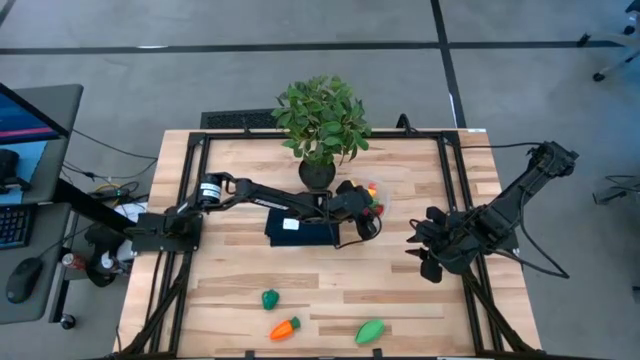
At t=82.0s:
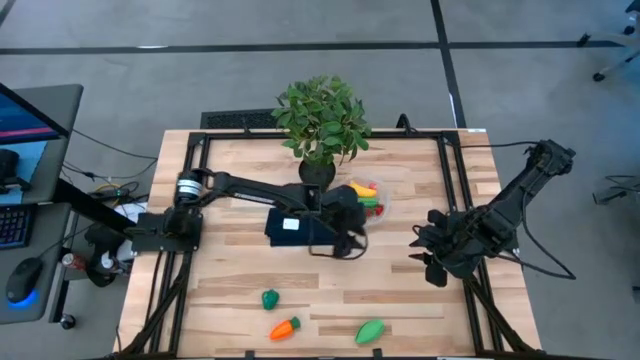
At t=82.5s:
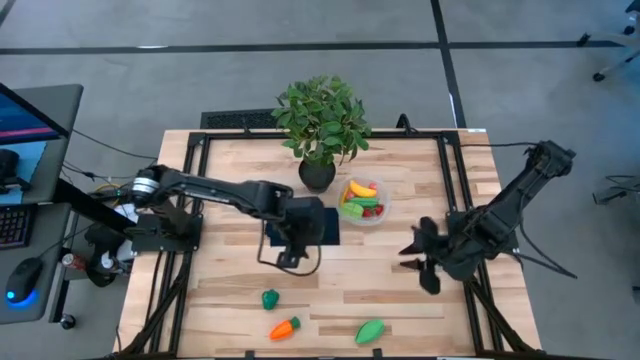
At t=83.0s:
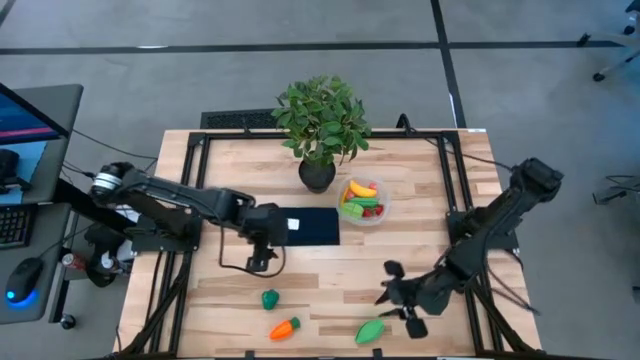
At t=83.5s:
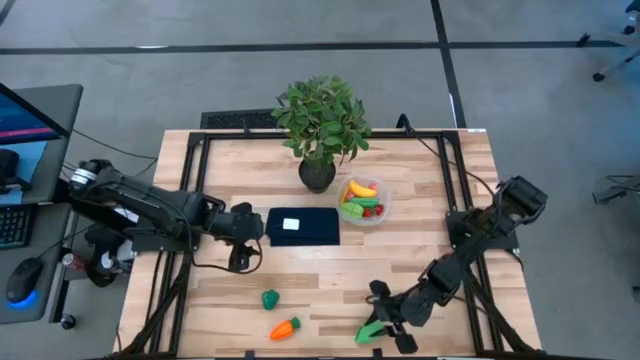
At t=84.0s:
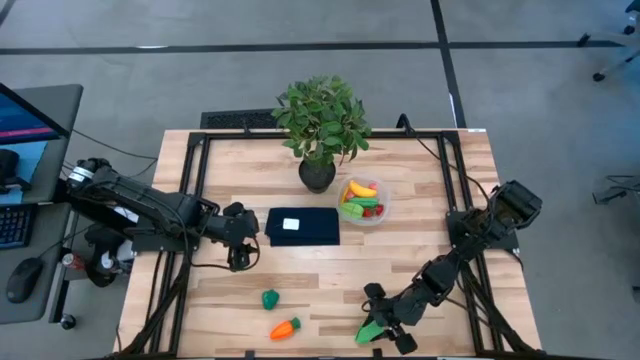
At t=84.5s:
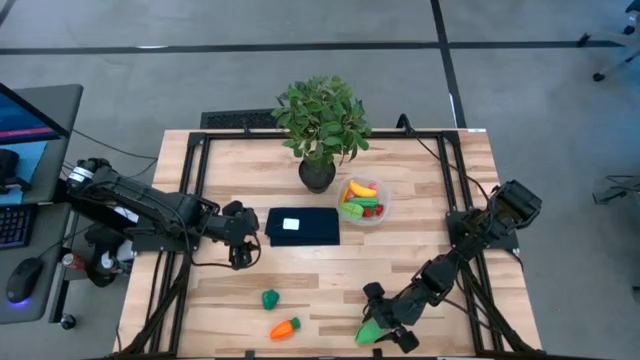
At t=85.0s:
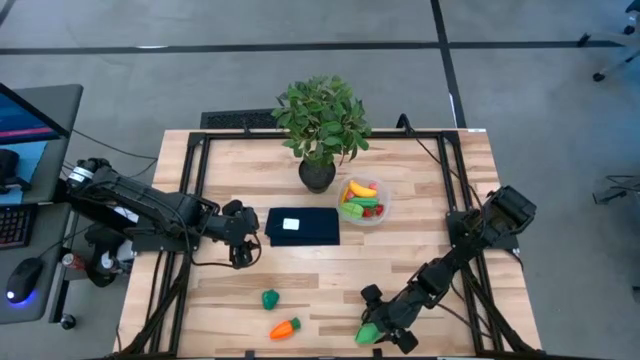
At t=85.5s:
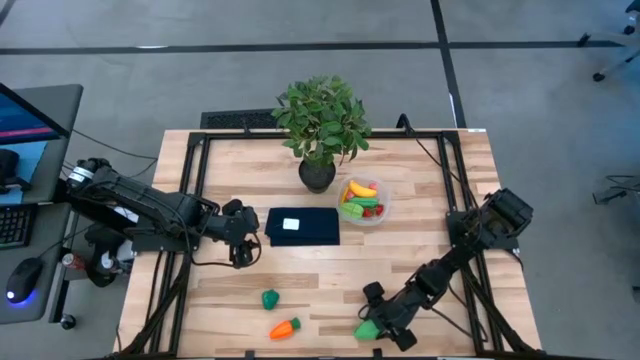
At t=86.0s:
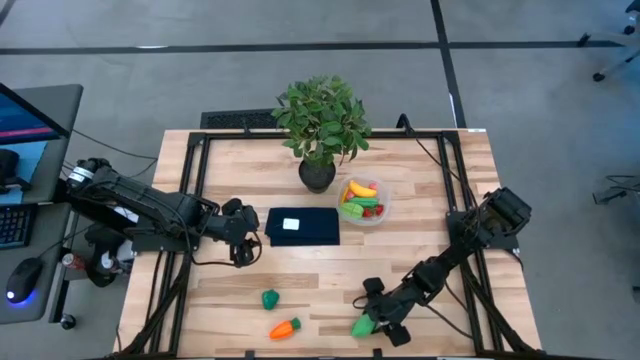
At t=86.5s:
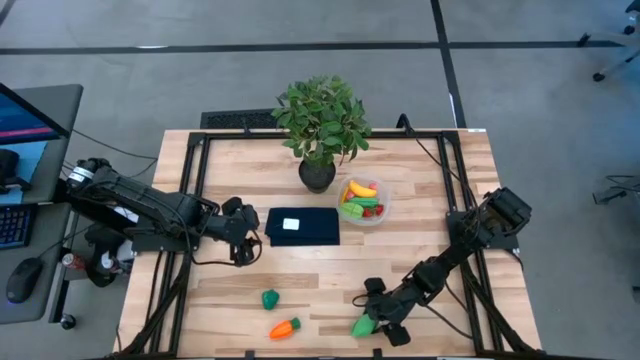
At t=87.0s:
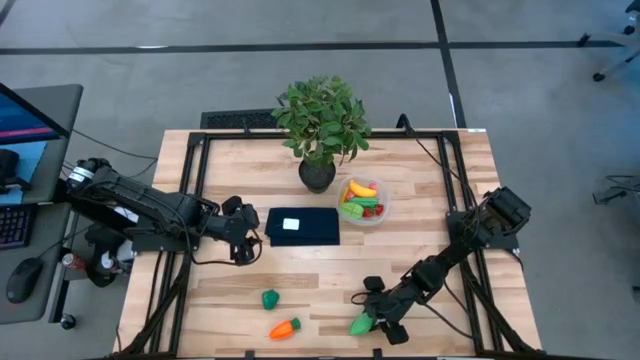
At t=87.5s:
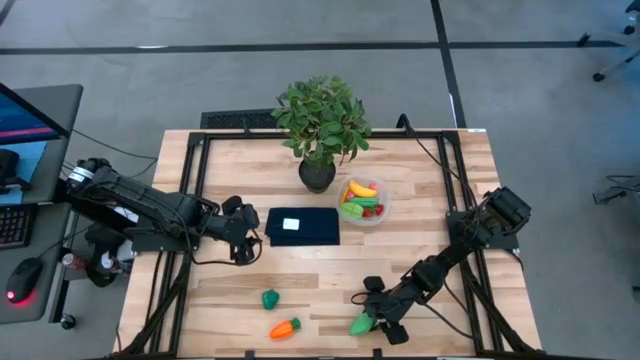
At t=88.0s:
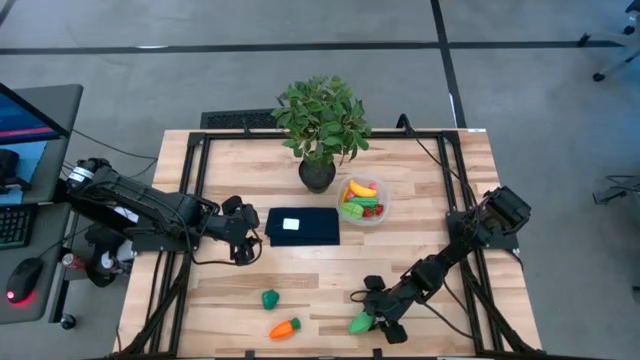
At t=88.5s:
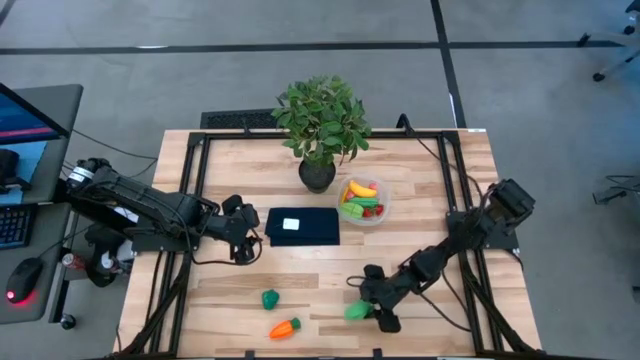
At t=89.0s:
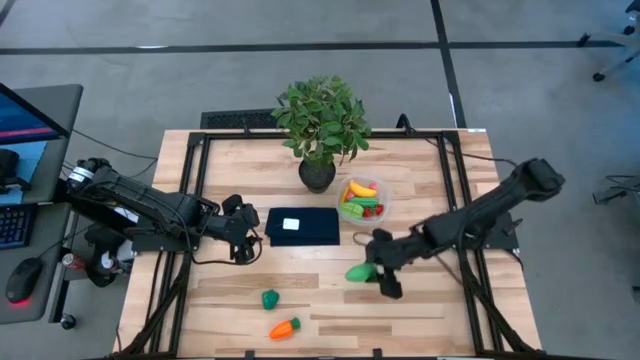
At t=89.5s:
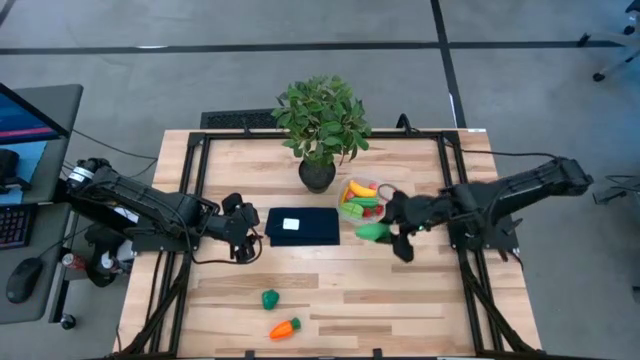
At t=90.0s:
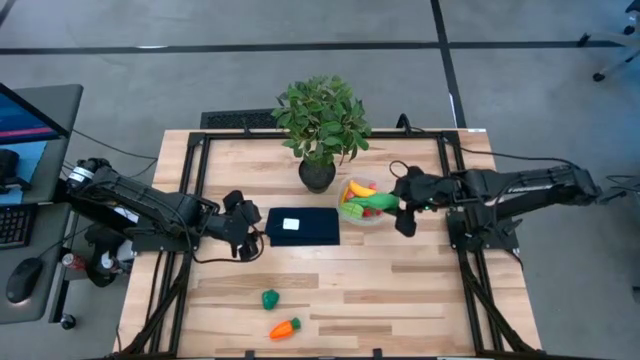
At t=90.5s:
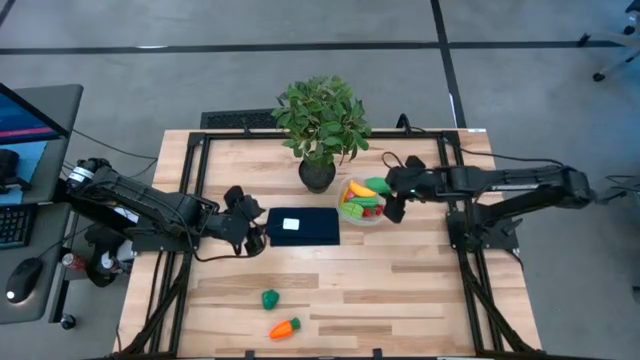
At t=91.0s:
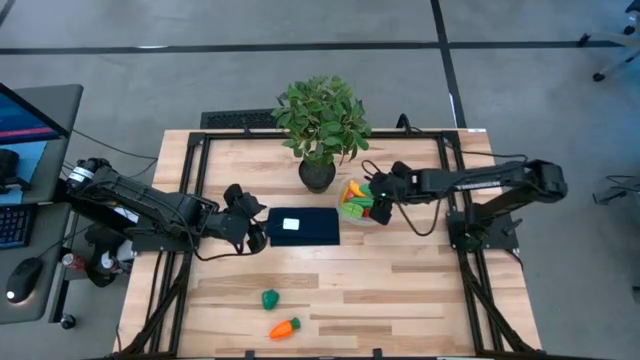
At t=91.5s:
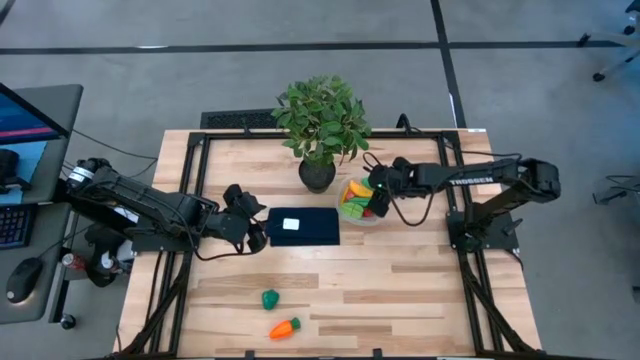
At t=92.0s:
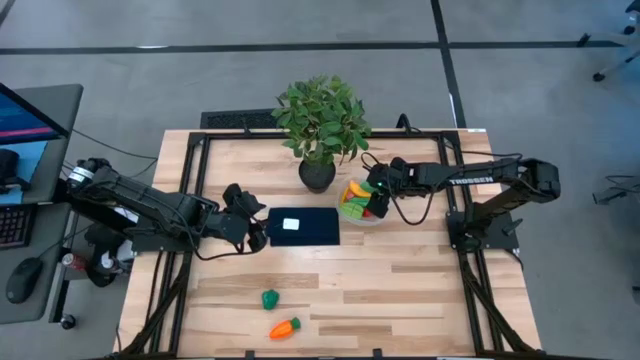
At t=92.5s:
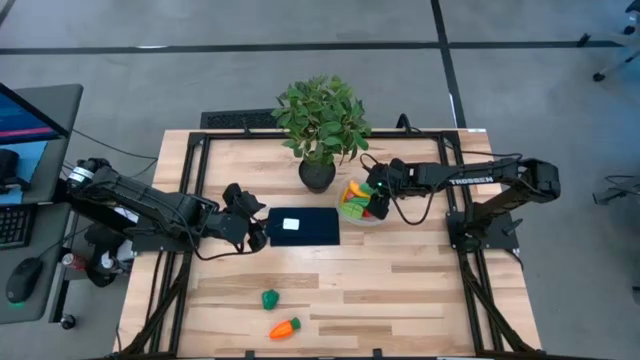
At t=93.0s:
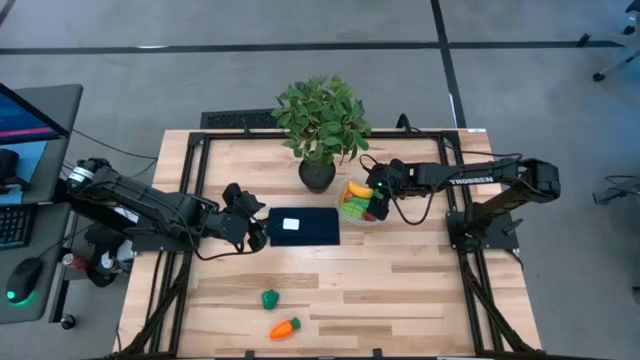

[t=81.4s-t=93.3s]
Task: Pick and placing Produce into tupperware
Put the green corn into the transparent container

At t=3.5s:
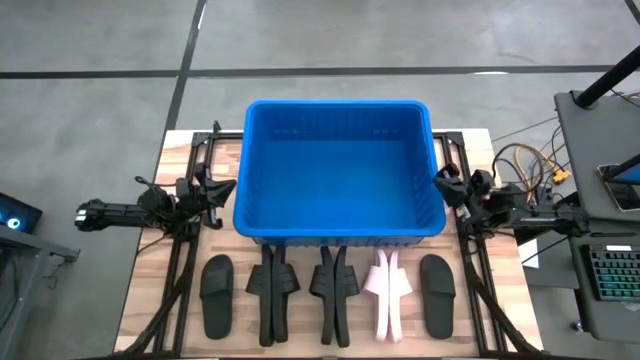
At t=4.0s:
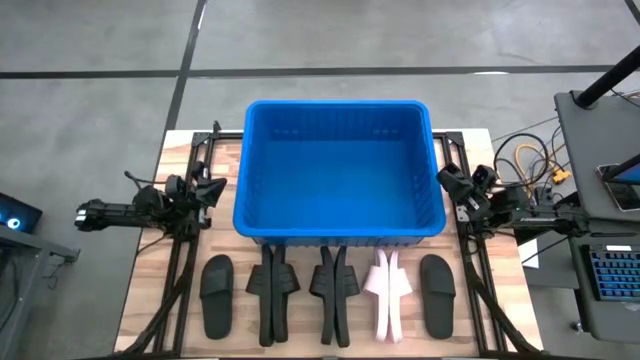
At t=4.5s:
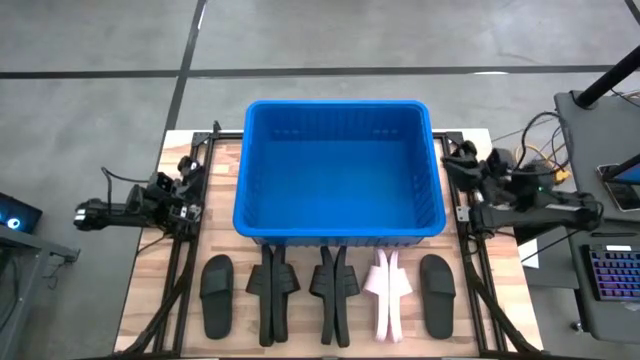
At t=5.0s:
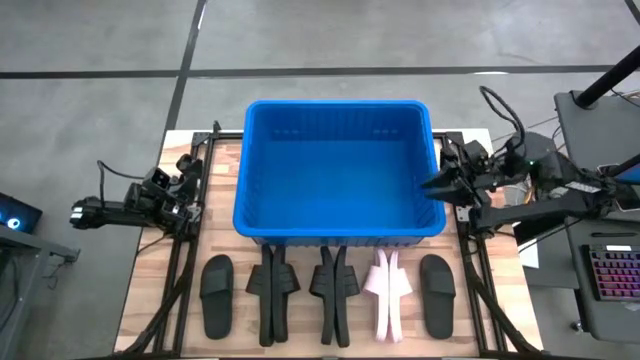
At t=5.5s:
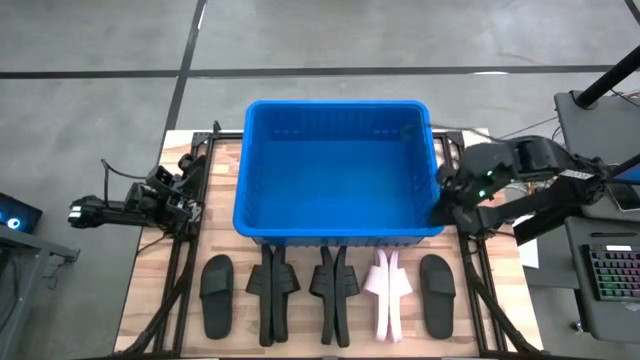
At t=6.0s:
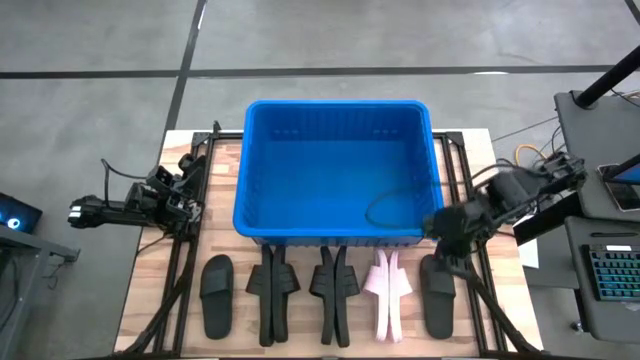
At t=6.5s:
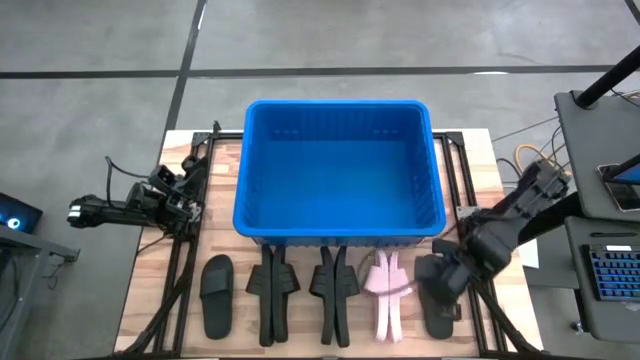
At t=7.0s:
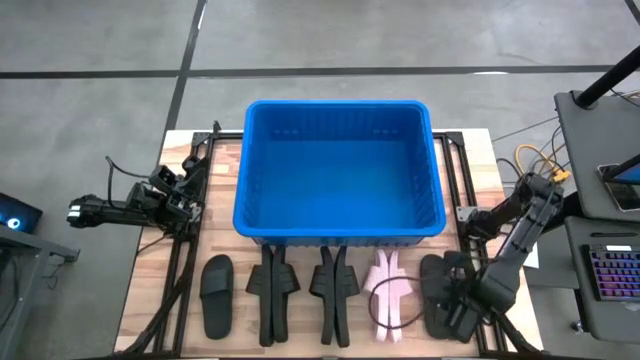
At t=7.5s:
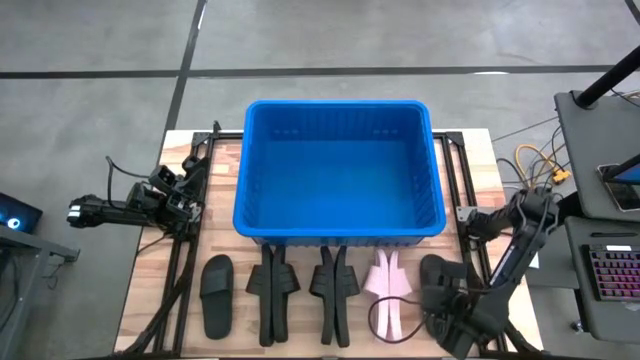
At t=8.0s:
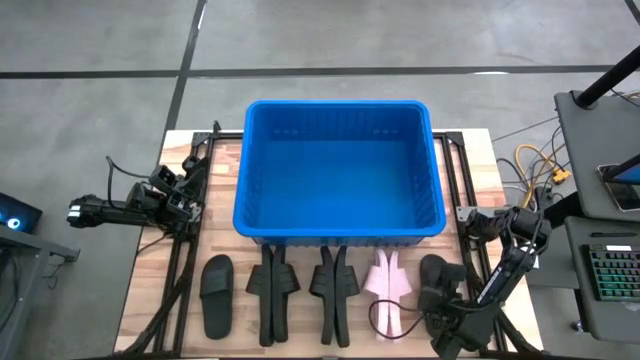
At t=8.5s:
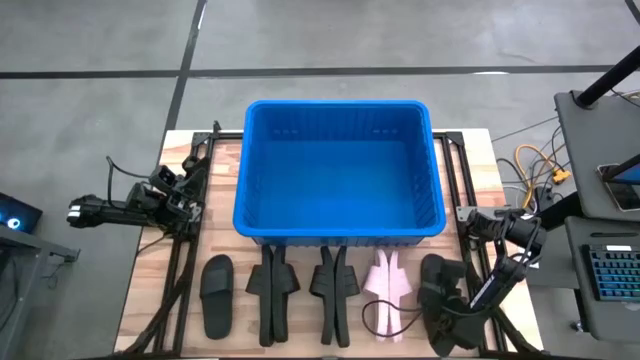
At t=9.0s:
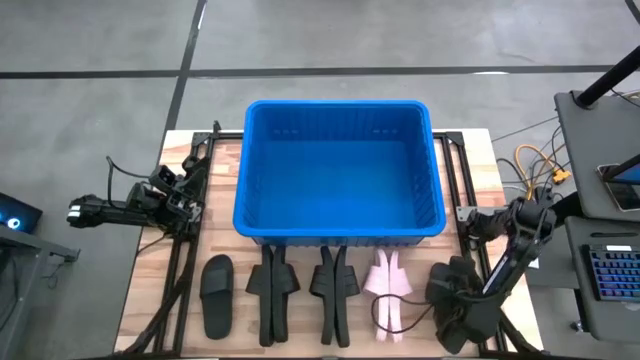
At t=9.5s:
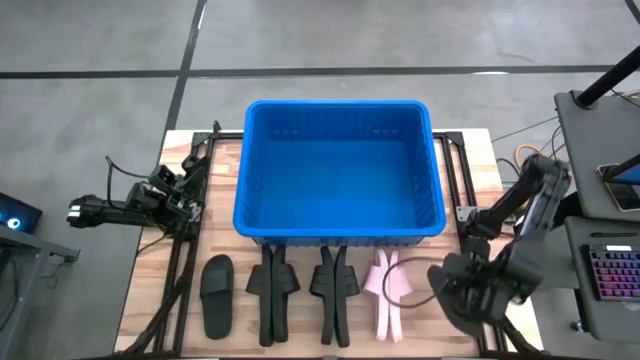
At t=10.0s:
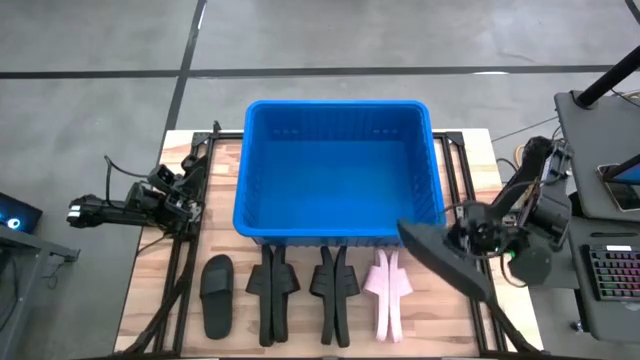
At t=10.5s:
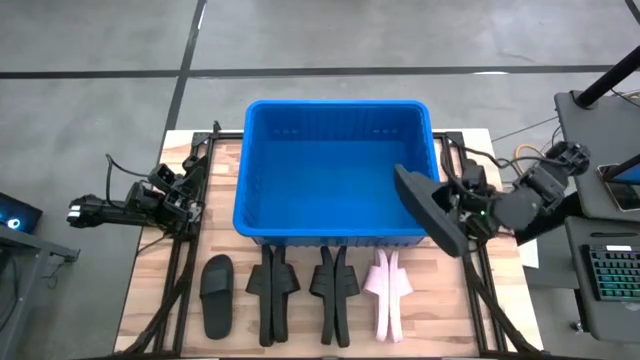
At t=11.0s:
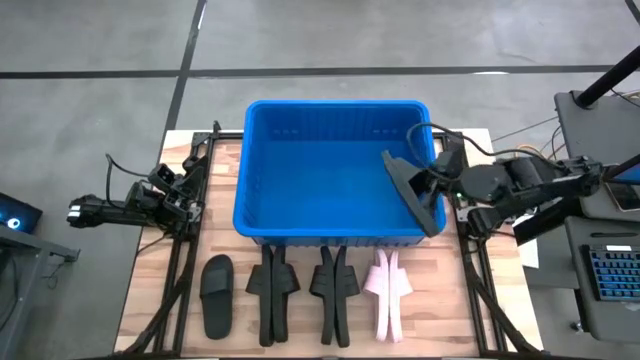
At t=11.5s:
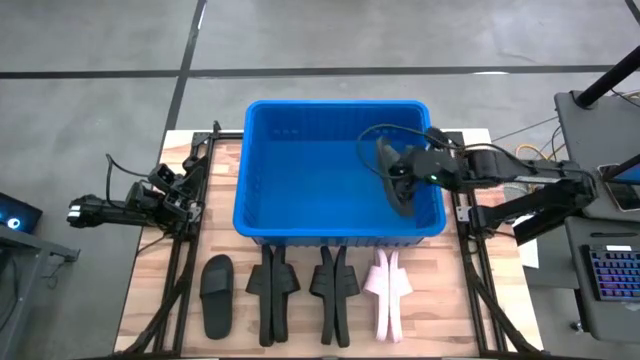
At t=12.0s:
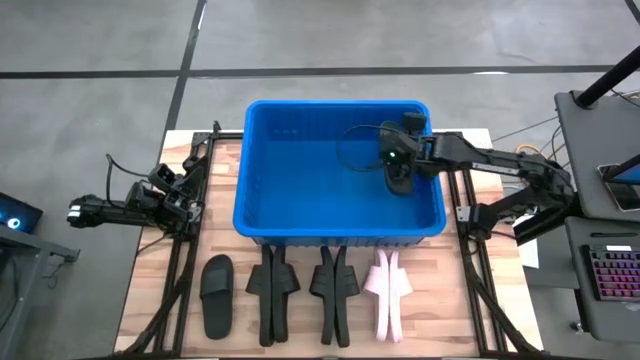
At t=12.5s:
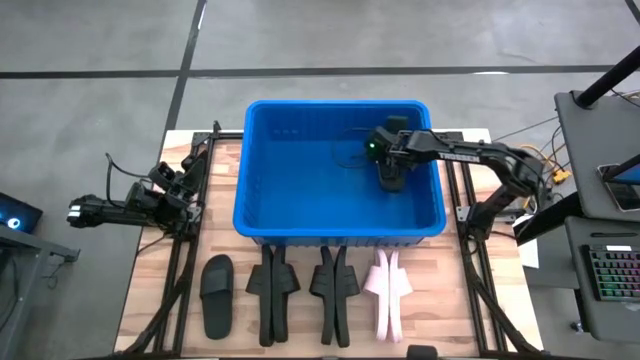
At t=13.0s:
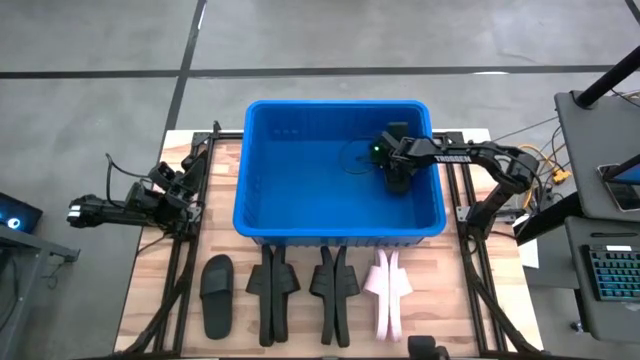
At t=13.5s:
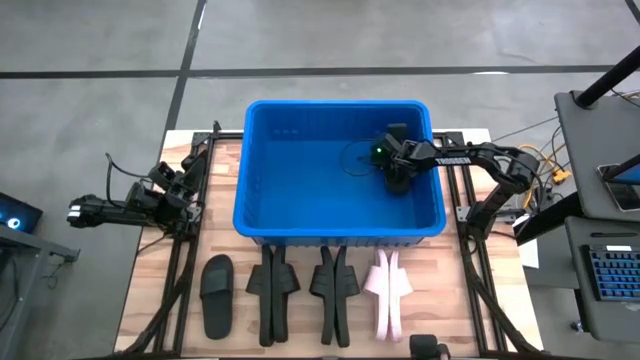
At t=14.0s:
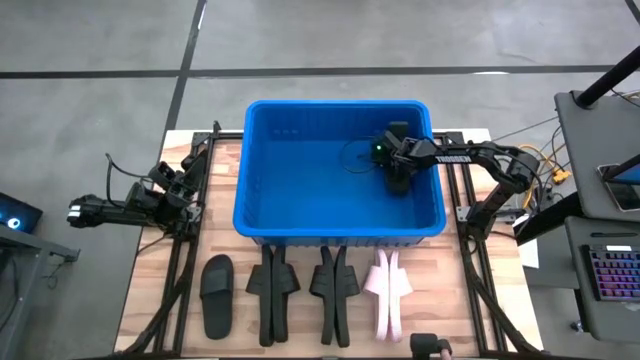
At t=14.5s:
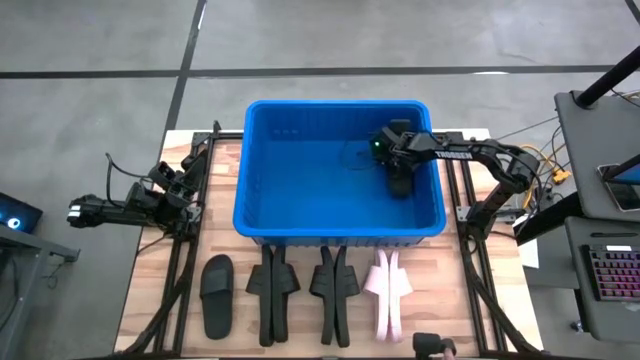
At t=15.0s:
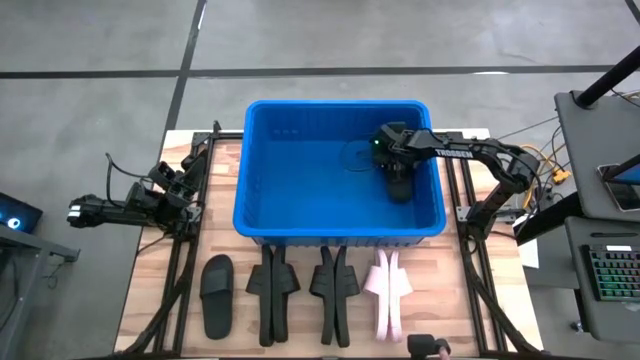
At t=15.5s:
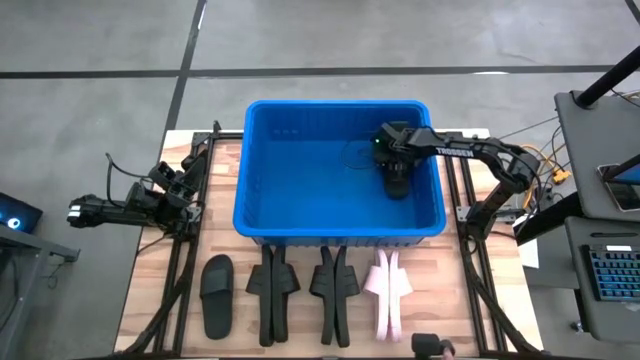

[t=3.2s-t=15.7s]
Task: Pick and place slides into bin
Put the black slide into the blue bin
